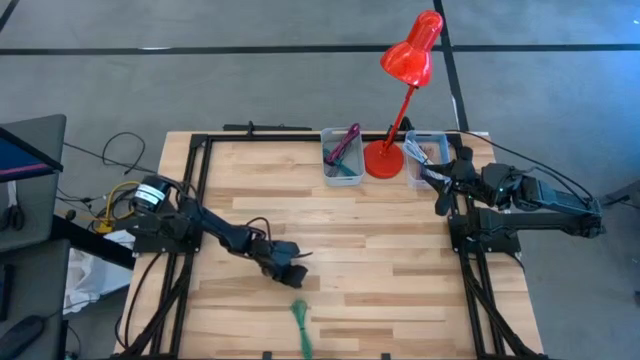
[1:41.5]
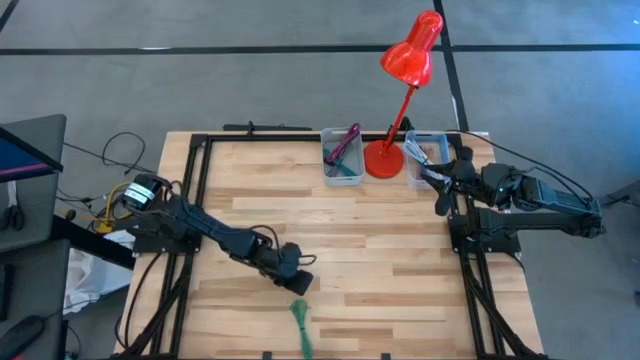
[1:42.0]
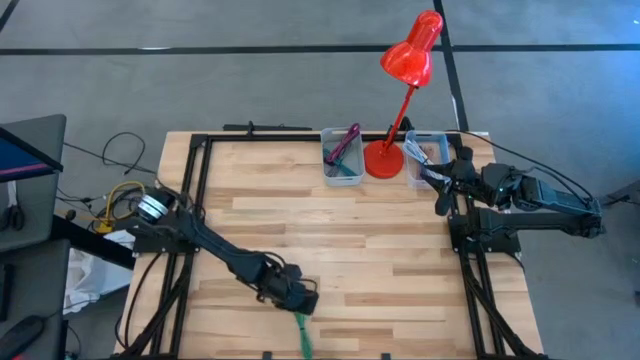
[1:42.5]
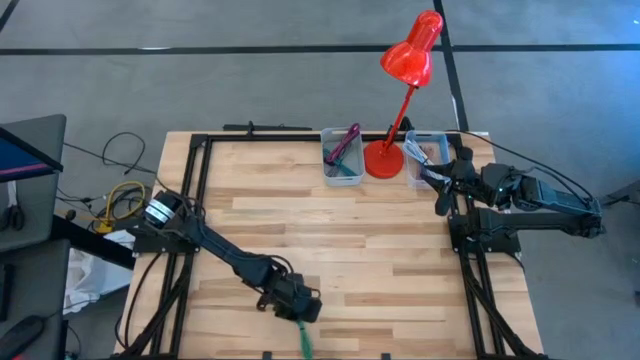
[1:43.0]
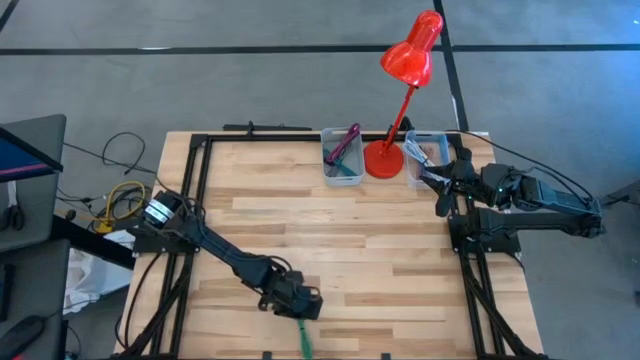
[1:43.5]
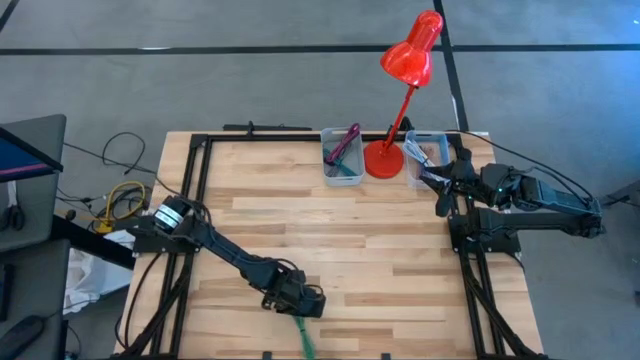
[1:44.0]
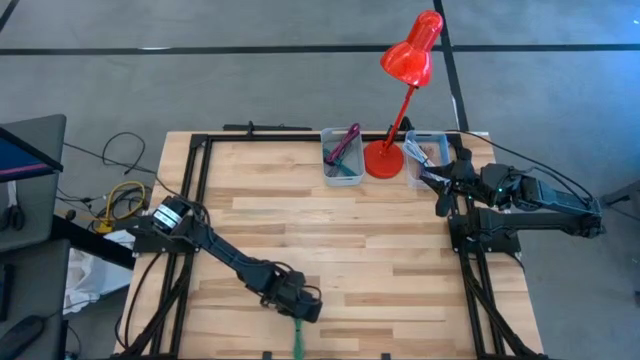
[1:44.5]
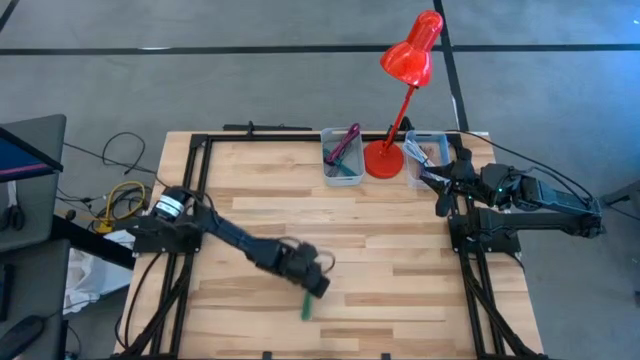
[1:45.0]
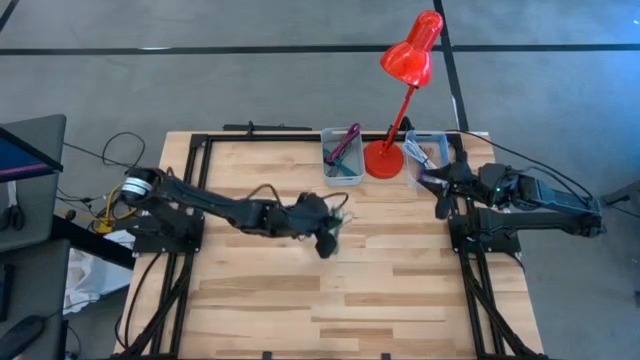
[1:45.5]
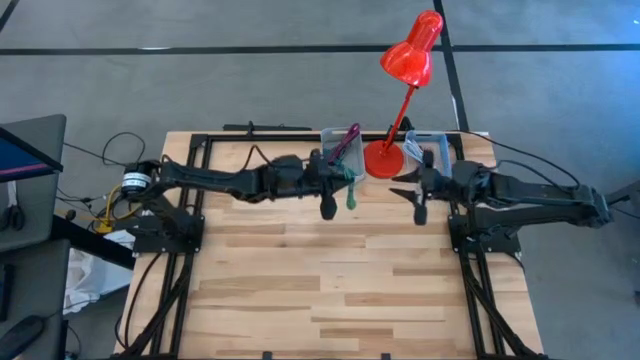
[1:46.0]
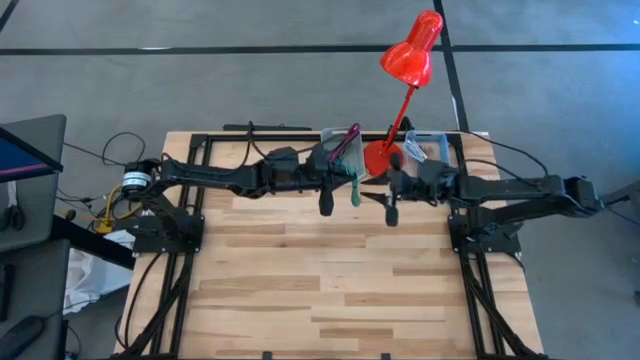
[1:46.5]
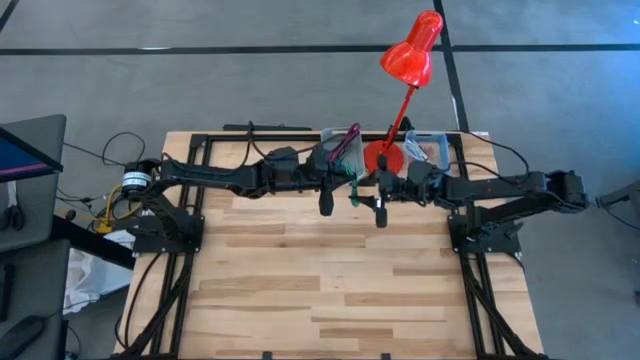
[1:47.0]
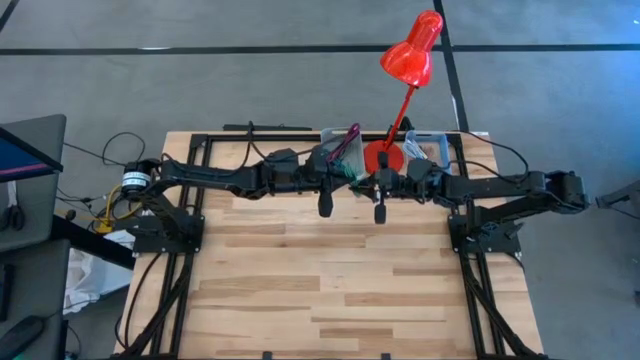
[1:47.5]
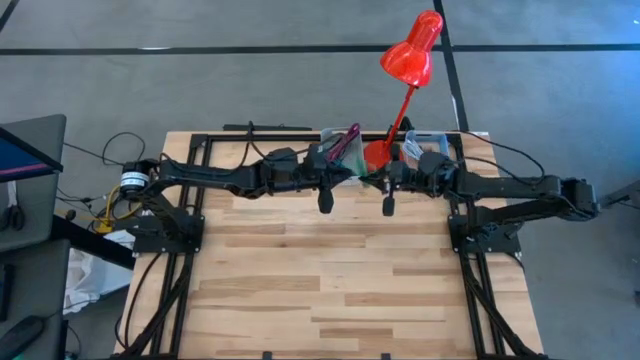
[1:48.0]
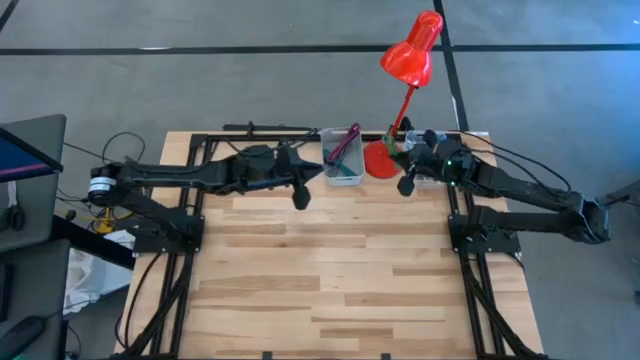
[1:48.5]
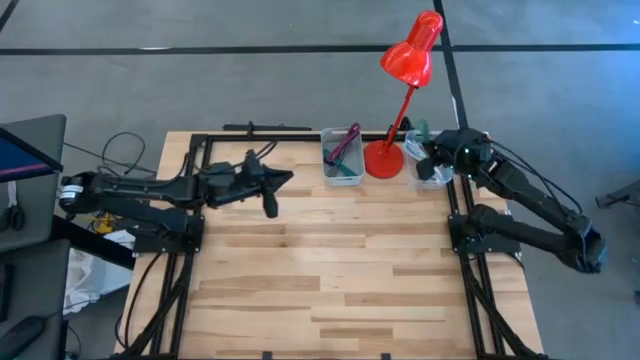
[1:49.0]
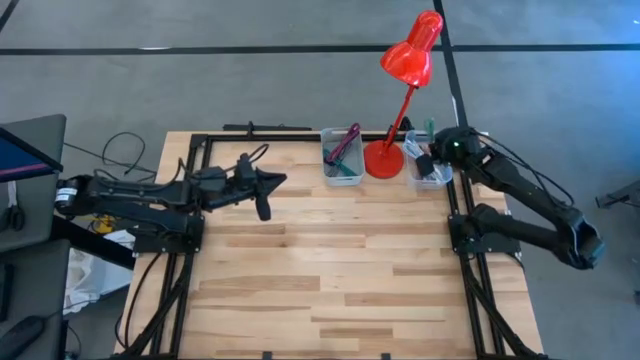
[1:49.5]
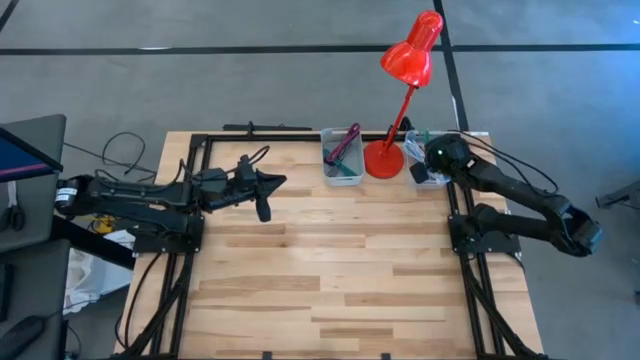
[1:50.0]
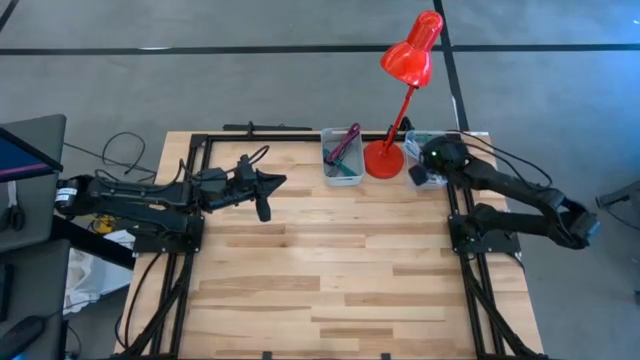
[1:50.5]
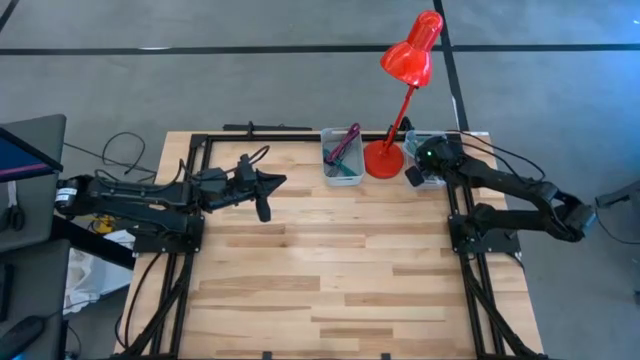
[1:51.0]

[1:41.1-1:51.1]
Task: Pick & Place USB Port
Put the green charger cable into the transparent bin

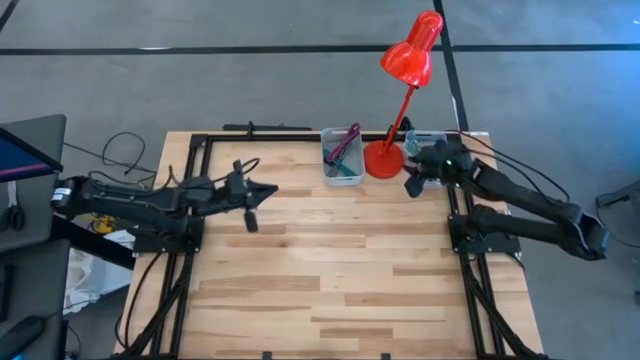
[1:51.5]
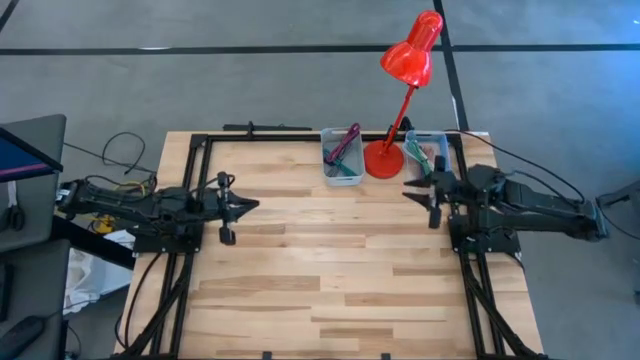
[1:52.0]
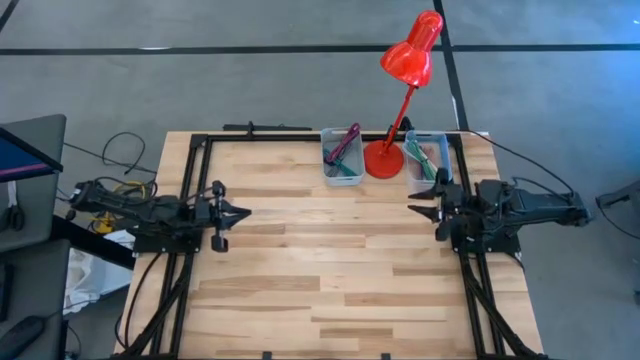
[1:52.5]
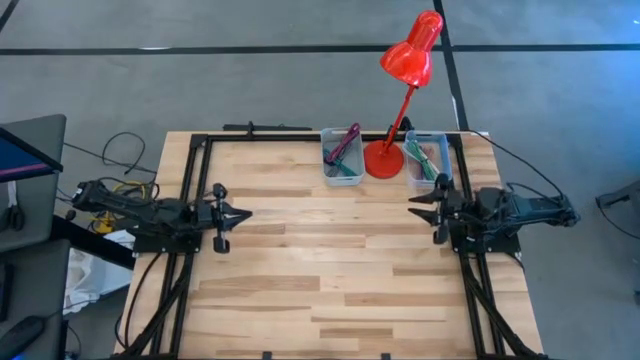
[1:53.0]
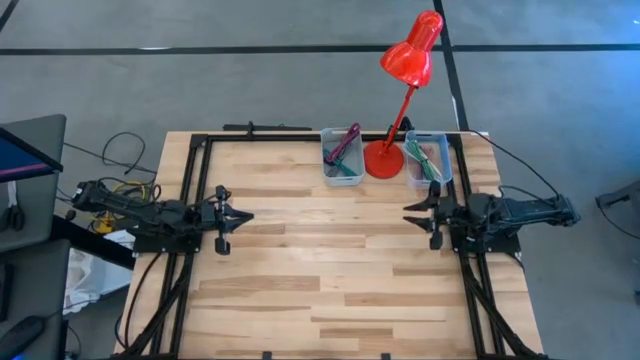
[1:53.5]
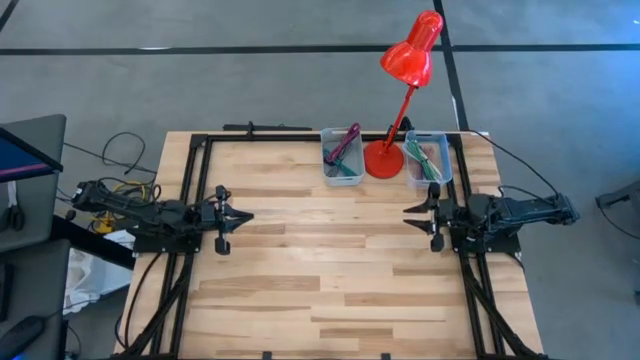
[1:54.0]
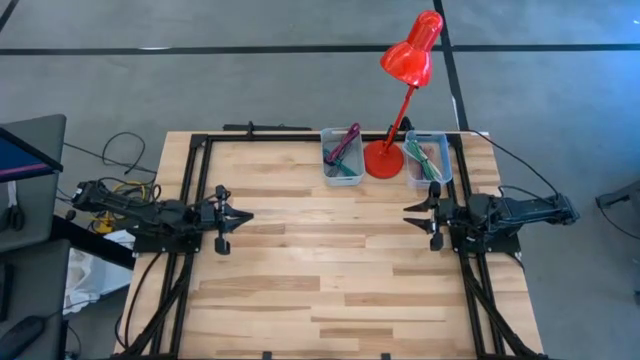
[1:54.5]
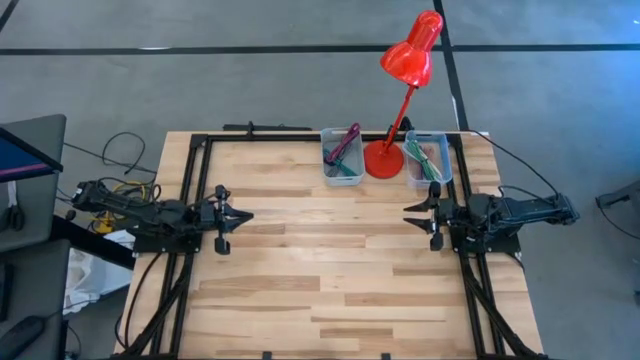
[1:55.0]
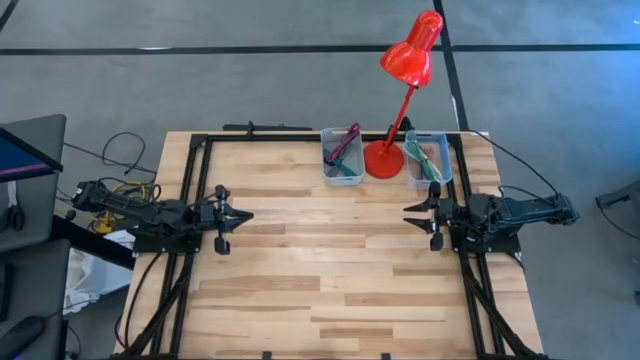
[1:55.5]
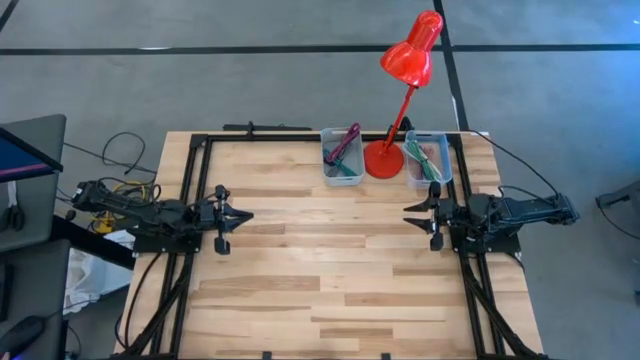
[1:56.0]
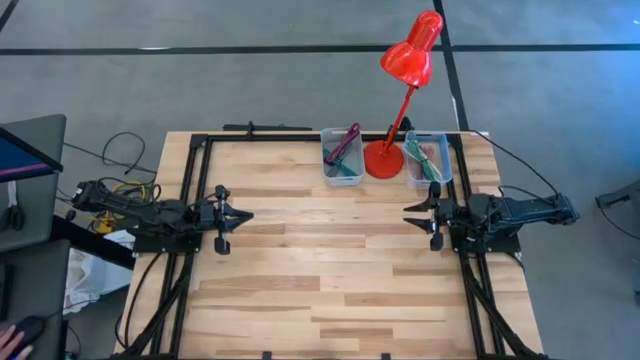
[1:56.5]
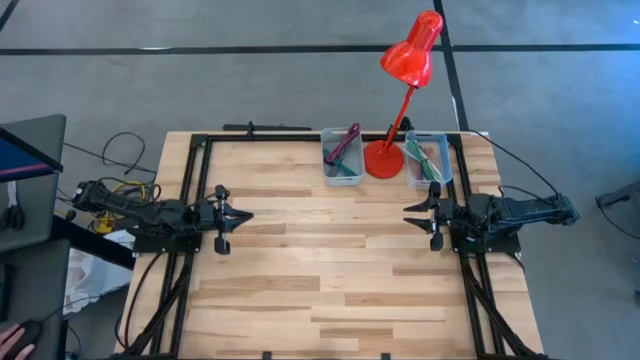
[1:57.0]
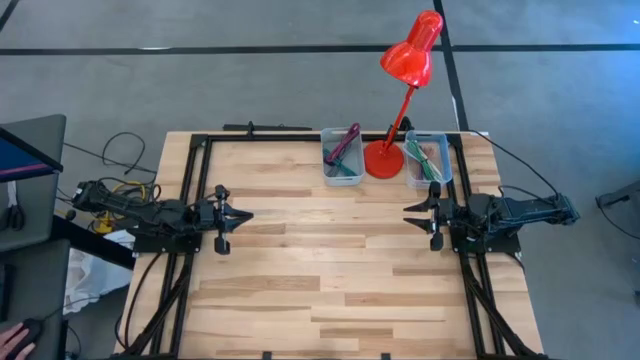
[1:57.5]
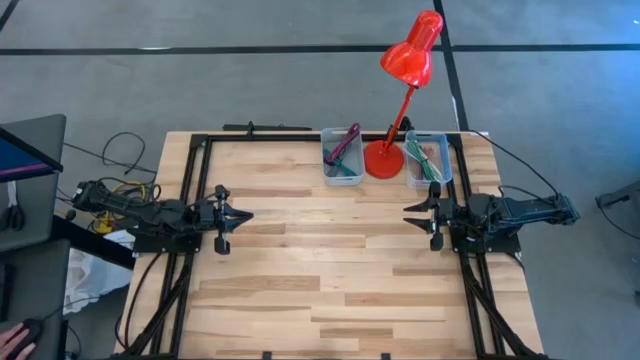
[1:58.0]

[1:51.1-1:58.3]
Return to Home Position

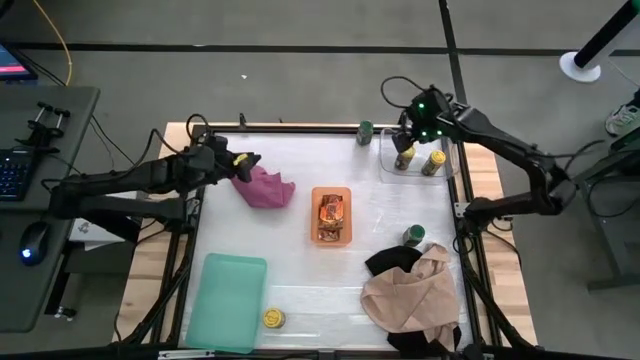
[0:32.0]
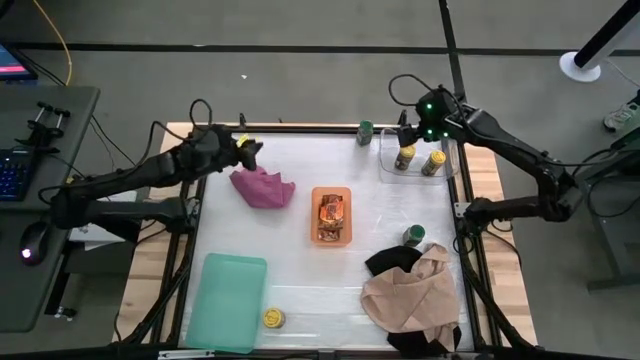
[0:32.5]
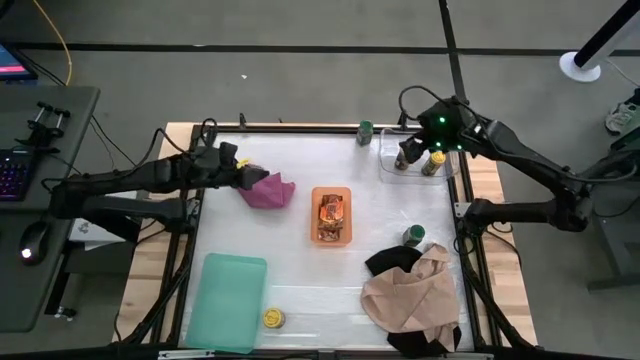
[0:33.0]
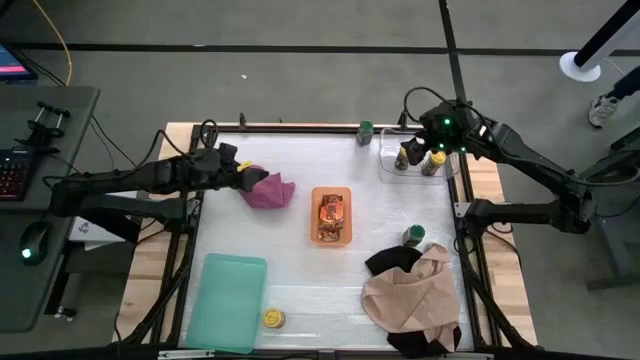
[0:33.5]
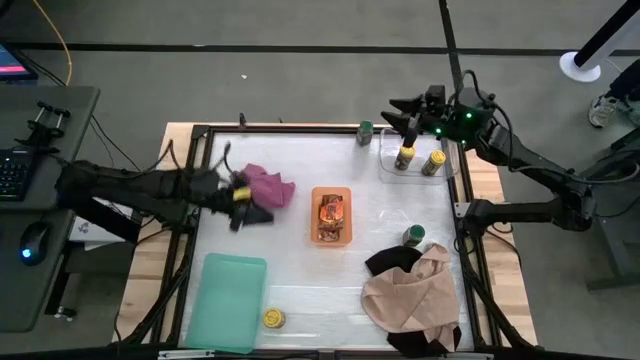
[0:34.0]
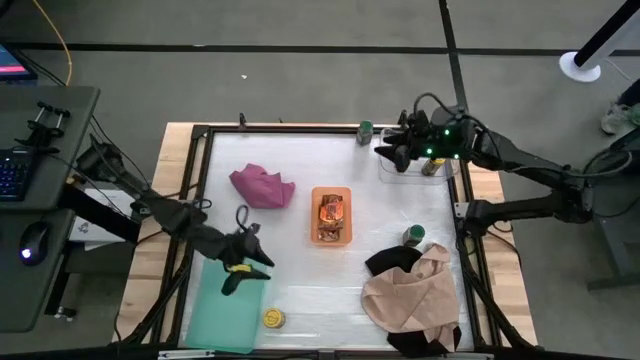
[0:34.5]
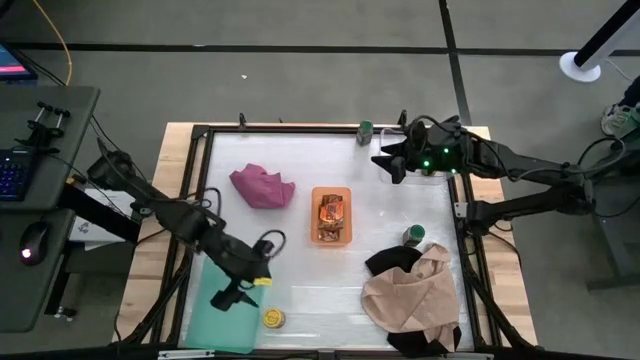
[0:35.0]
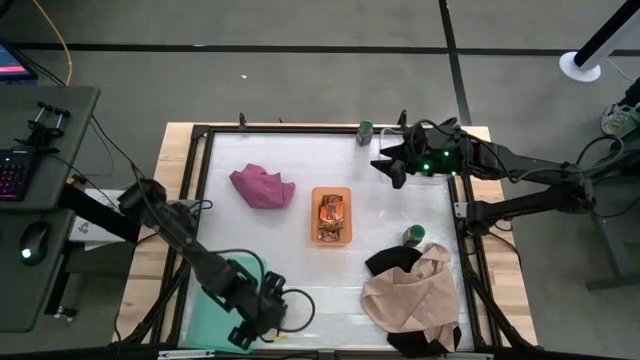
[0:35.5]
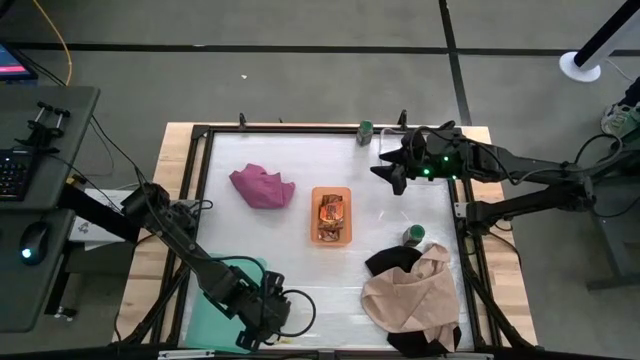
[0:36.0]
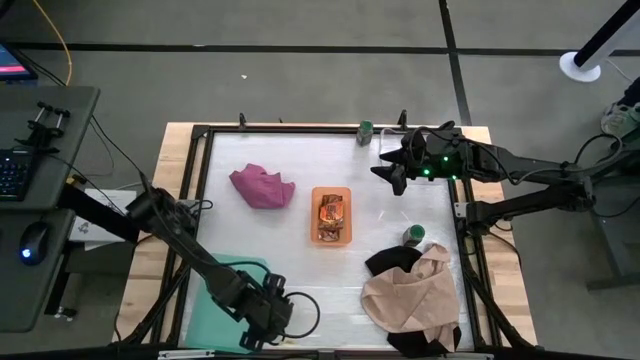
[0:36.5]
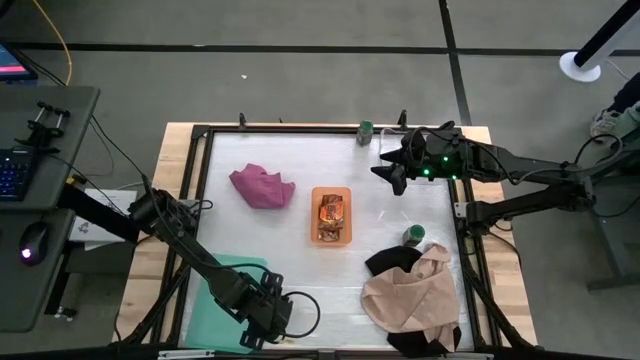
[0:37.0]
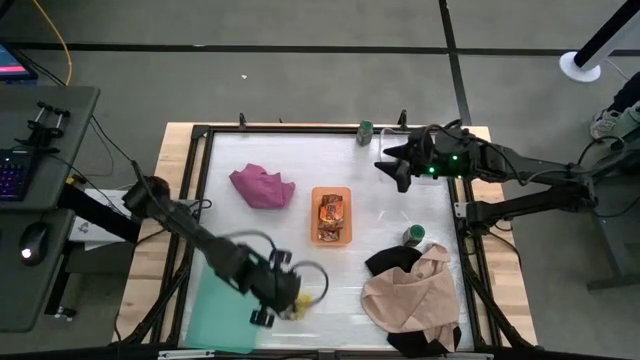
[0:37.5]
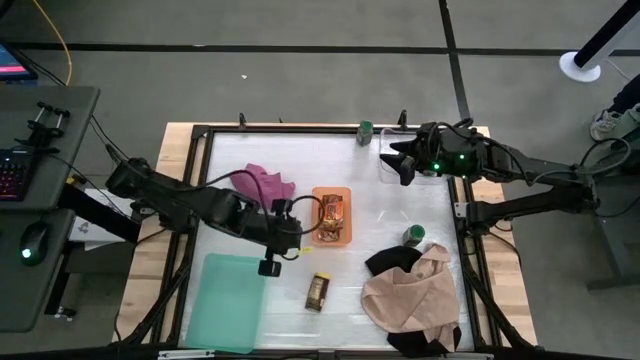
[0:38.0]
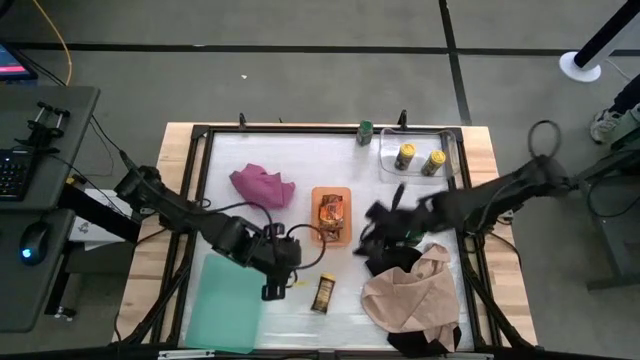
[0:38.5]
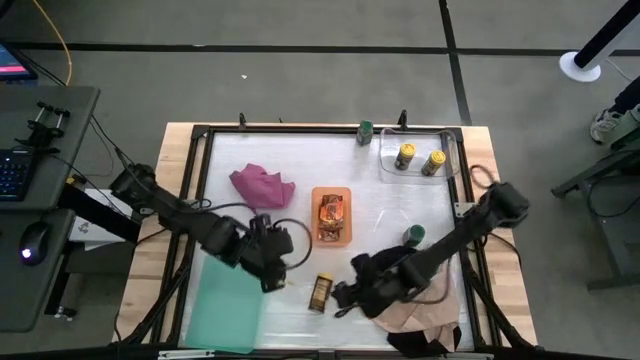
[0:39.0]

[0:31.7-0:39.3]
Task: Sort spices by type
Put the yellow seasoning bottle into the transparent bin
